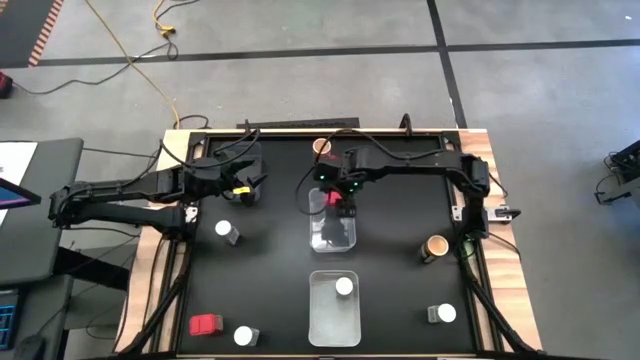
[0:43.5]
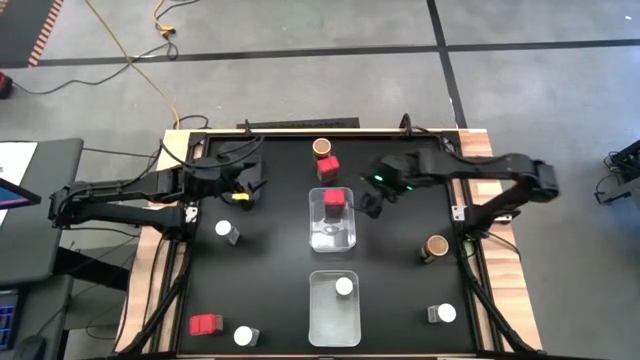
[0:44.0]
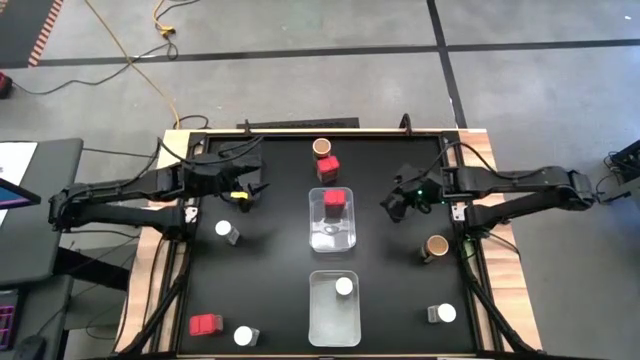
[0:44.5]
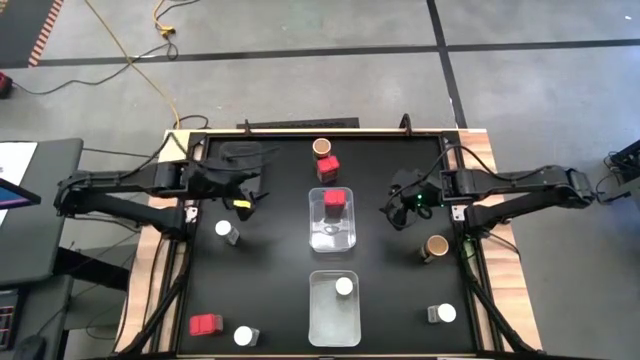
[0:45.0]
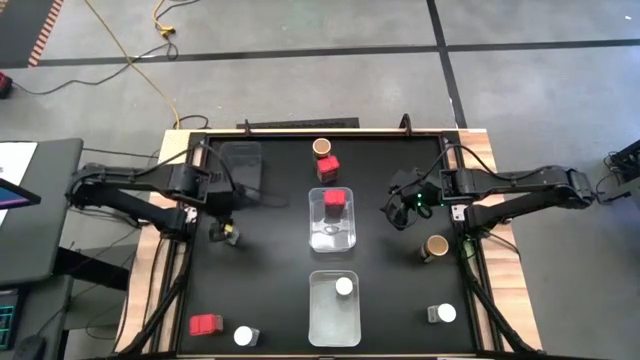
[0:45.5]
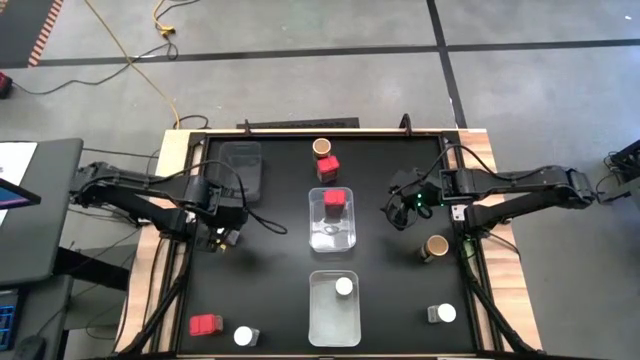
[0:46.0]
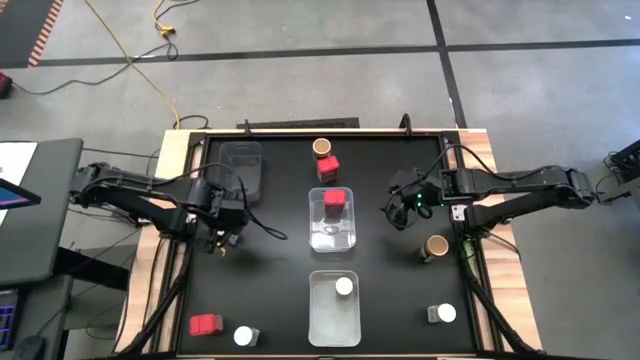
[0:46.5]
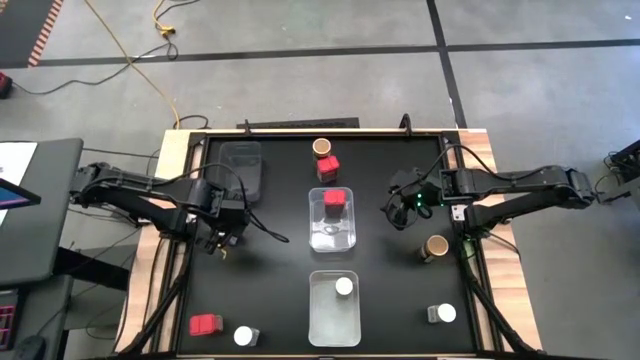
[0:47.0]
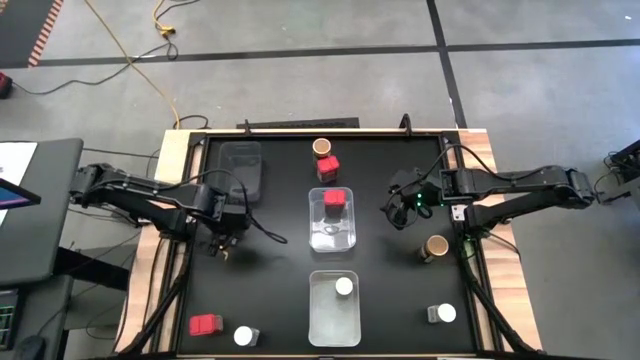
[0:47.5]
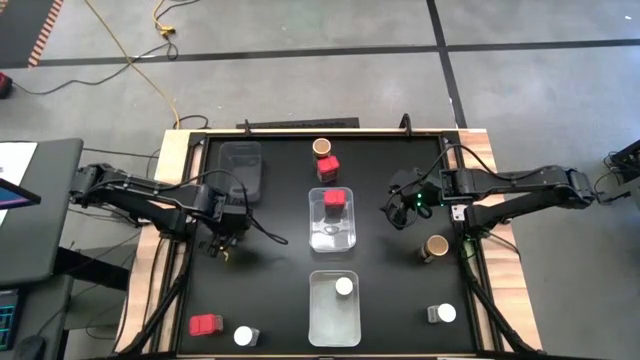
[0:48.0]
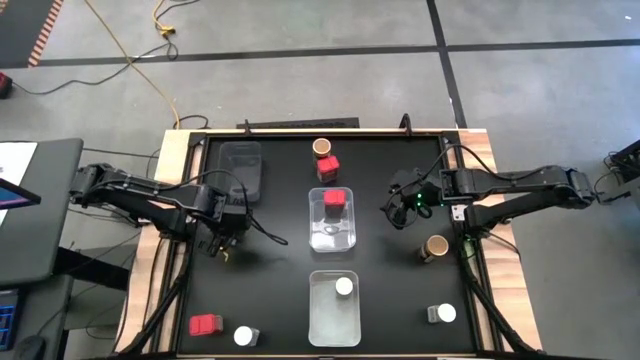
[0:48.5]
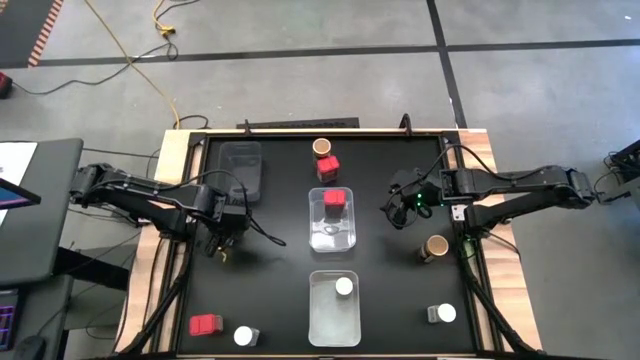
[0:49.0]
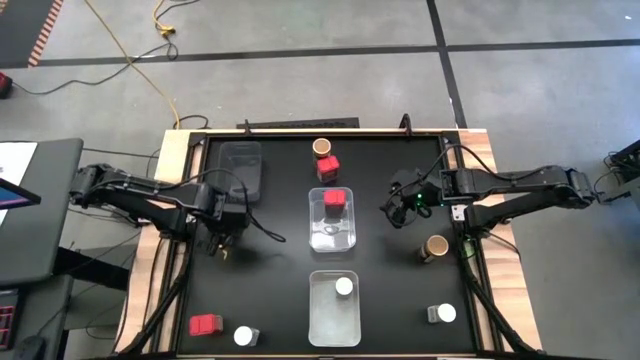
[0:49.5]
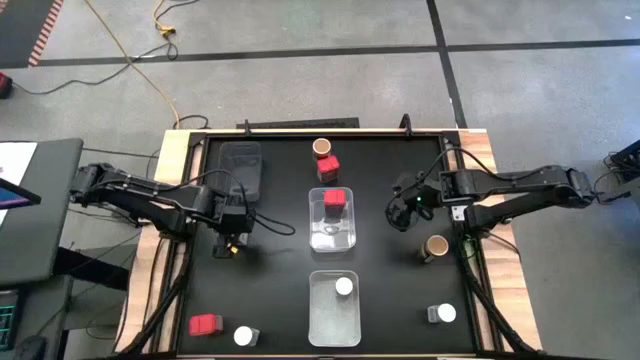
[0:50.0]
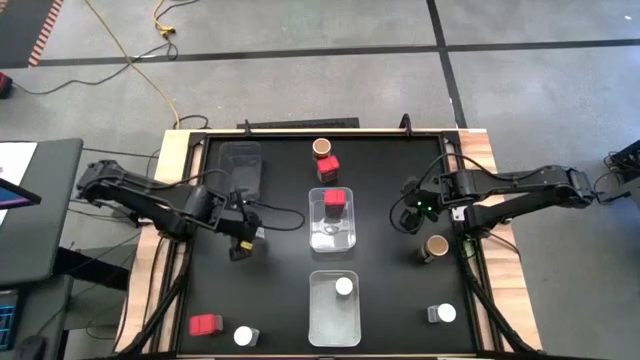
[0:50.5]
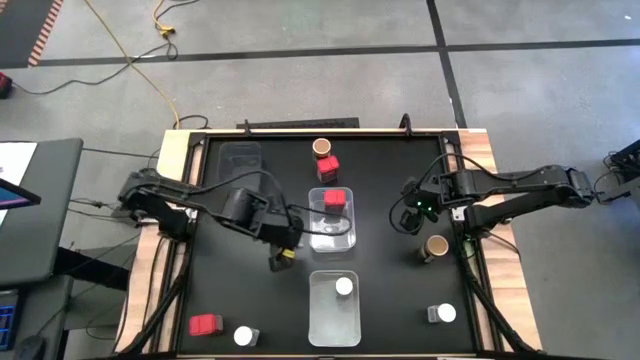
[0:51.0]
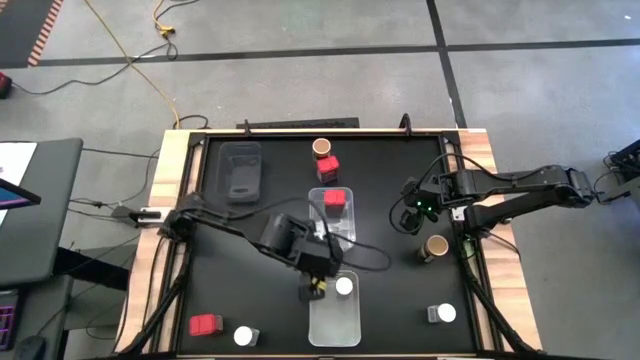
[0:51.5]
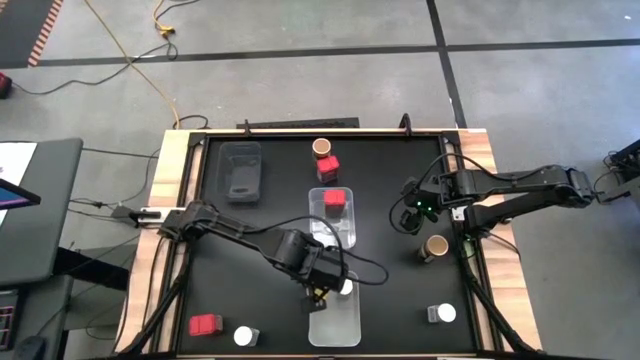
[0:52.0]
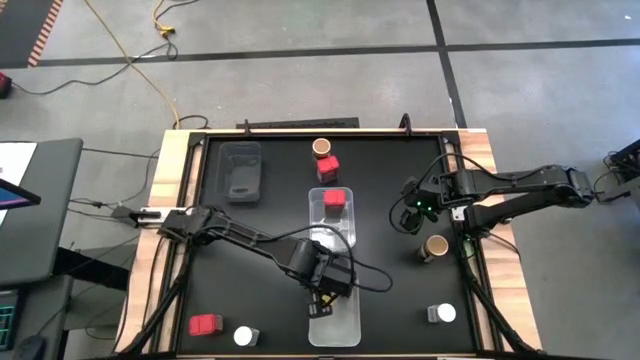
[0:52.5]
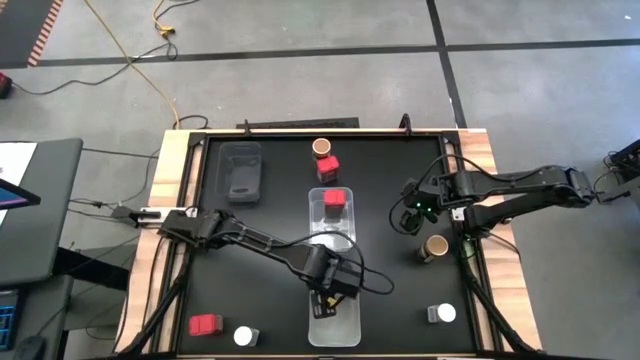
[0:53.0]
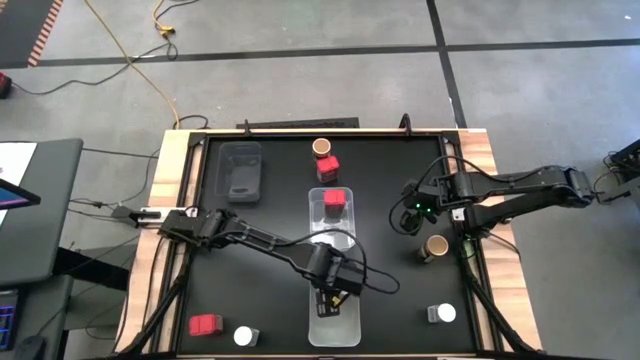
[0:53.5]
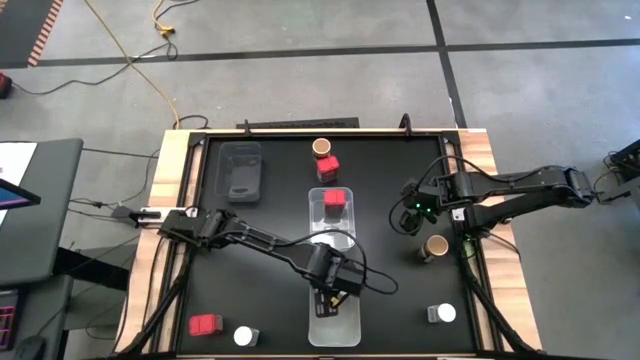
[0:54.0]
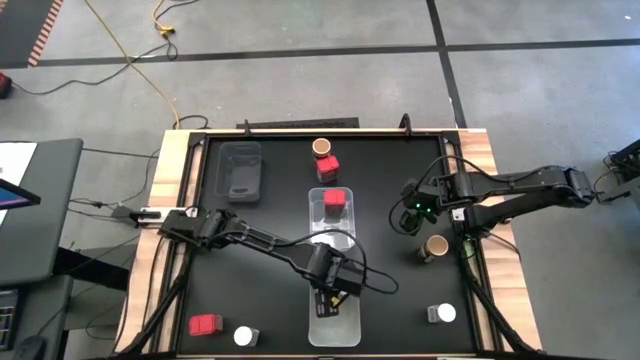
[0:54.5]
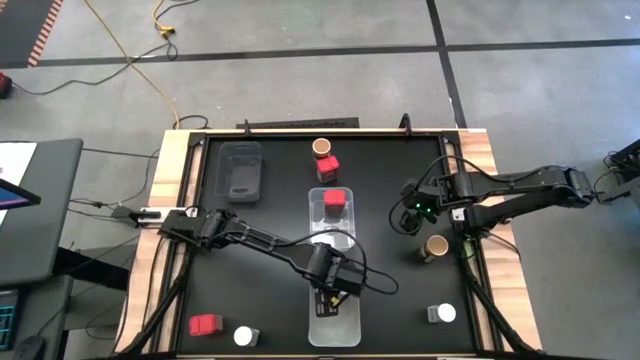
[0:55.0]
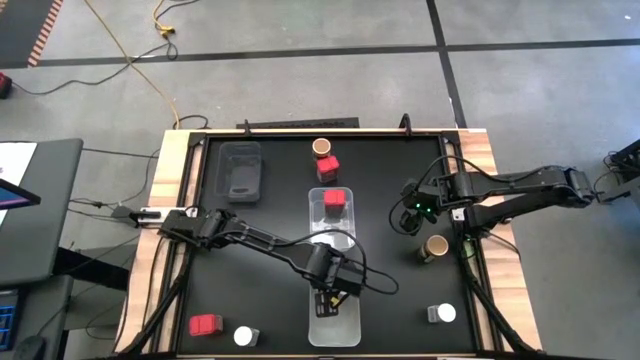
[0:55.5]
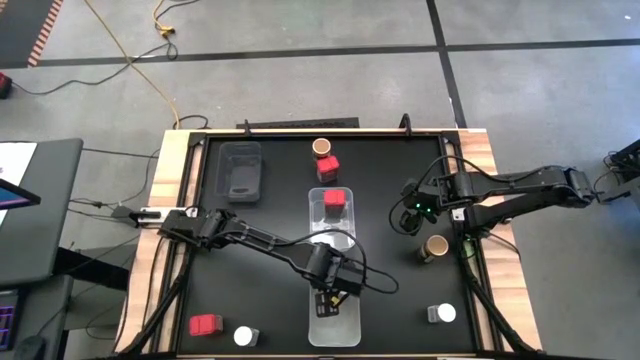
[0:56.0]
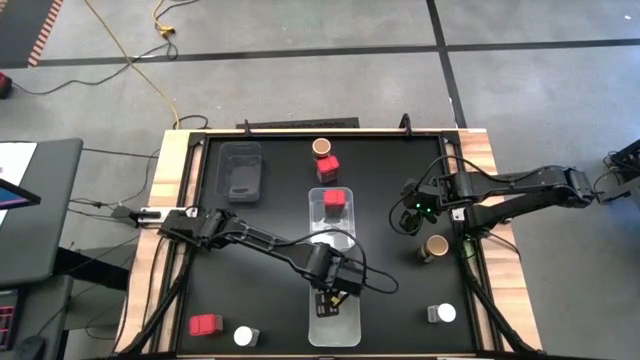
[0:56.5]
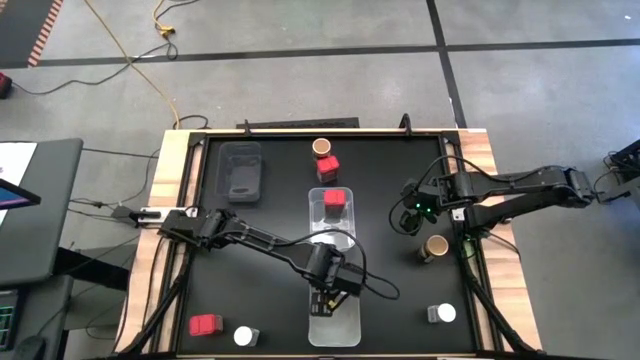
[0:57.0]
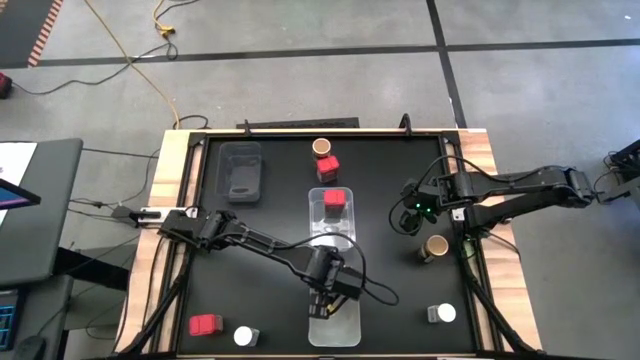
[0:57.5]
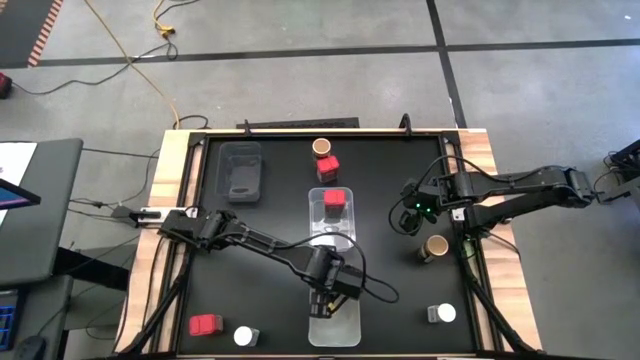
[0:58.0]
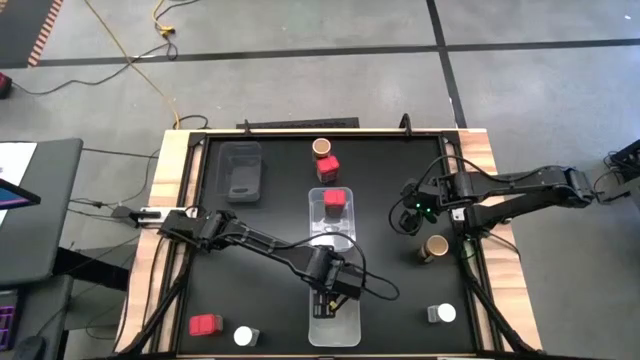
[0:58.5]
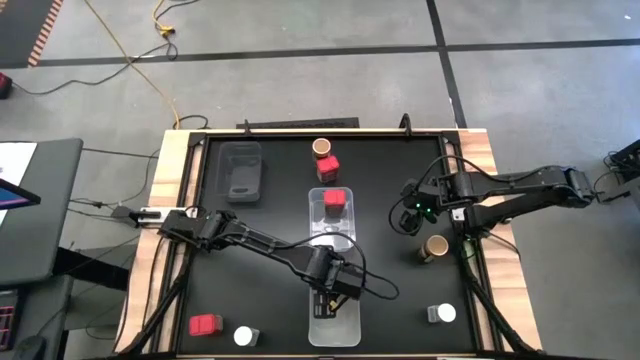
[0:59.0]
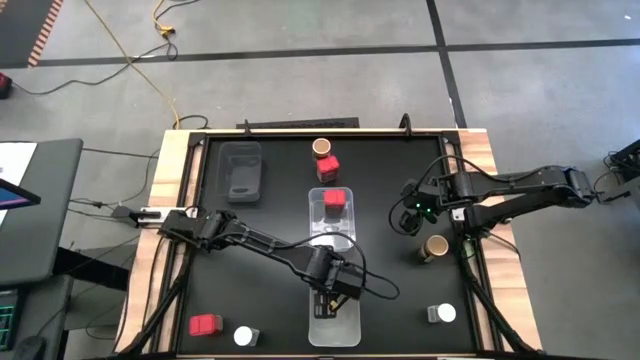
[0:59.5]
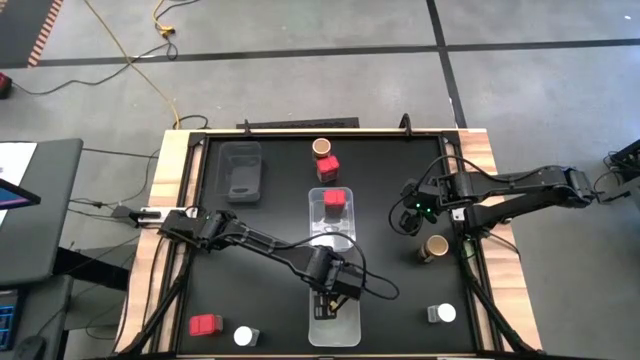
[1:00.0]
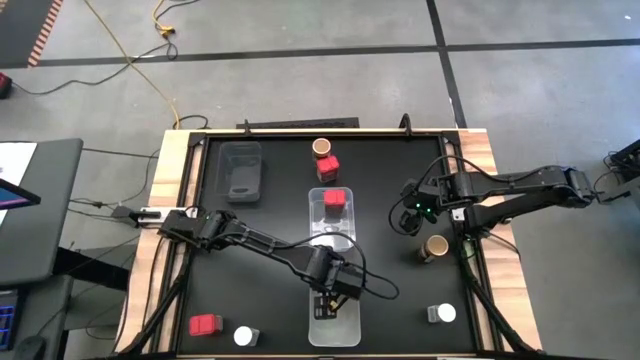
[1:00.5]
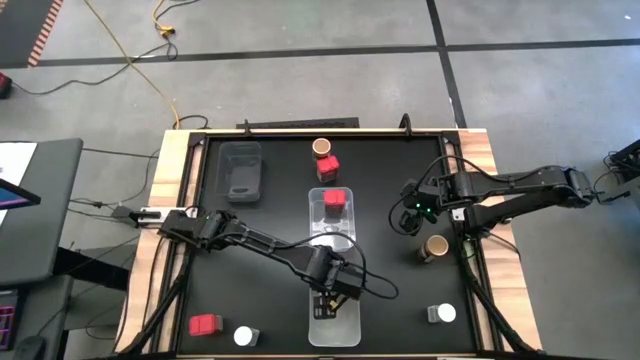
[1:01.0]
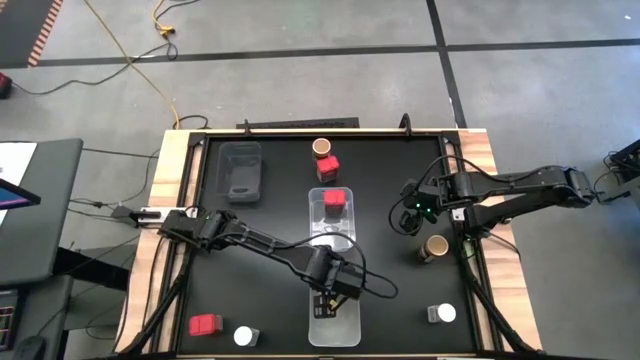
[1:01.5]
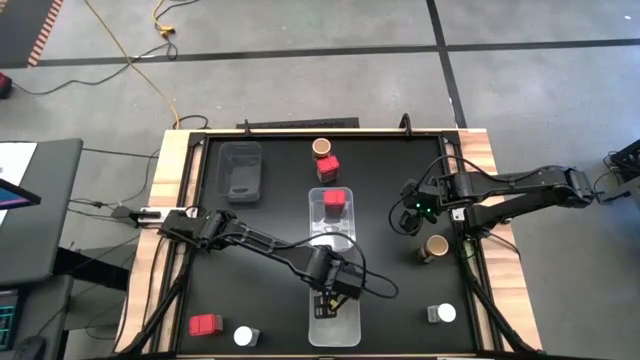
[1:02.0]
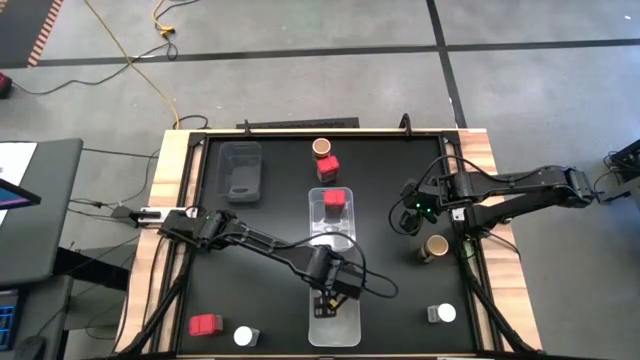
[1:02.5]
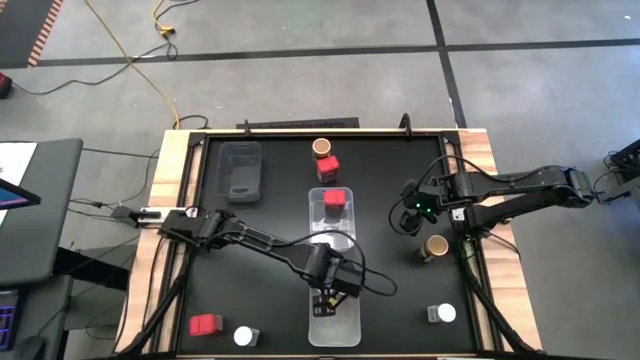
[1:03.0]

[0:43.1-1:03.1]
Task: Sort spices by type
Put the white seasoning bottle into the white bin
